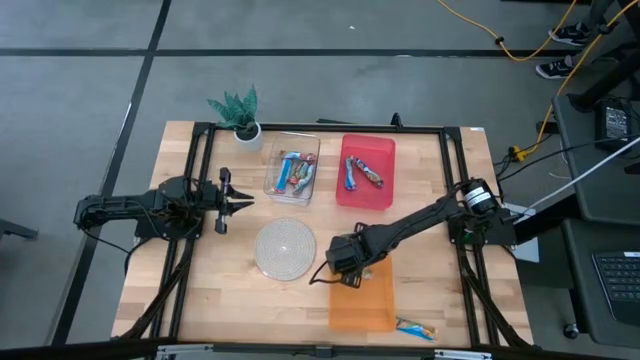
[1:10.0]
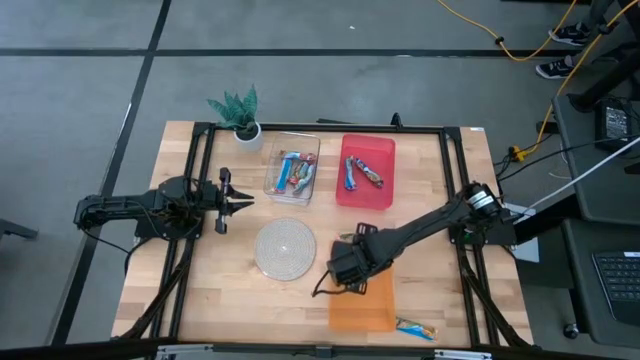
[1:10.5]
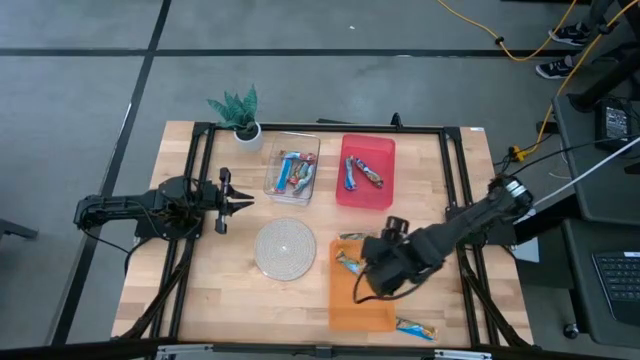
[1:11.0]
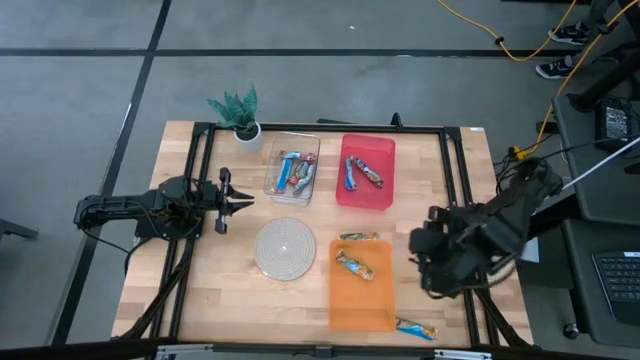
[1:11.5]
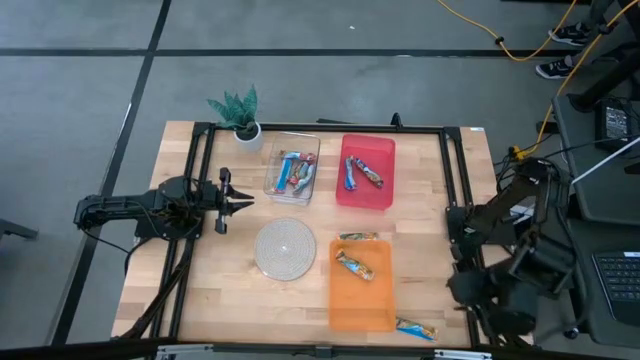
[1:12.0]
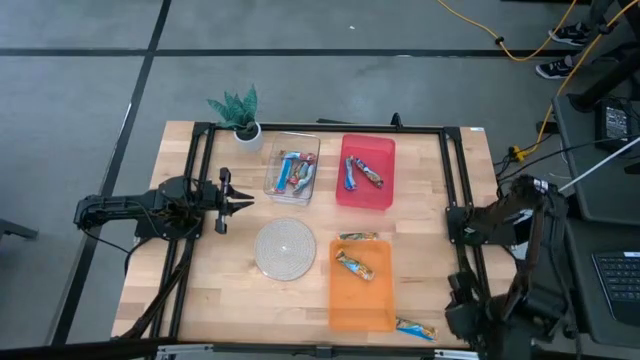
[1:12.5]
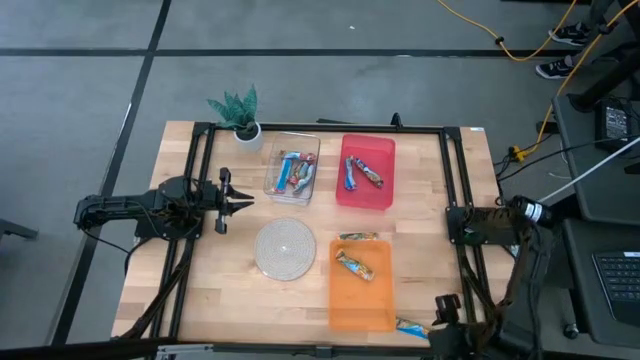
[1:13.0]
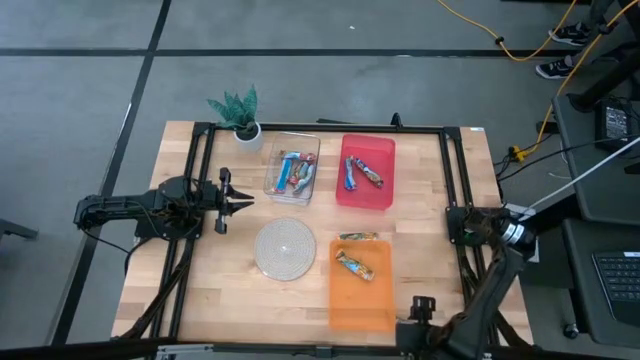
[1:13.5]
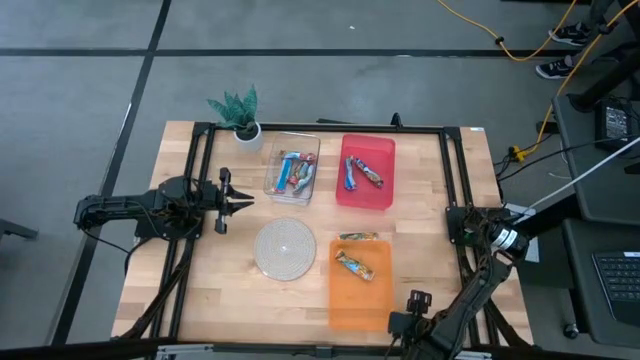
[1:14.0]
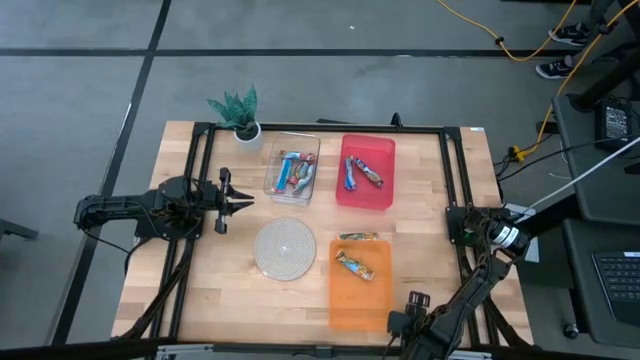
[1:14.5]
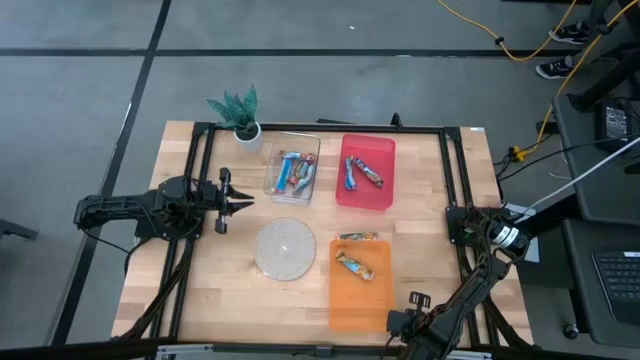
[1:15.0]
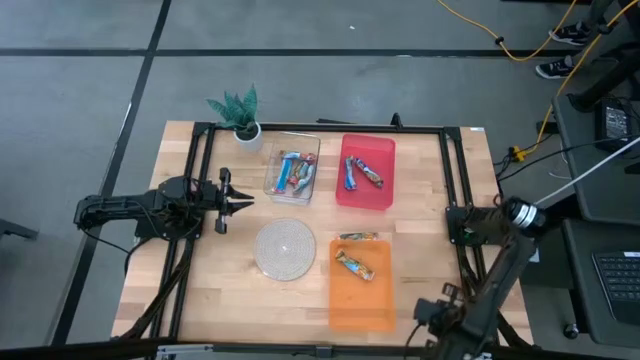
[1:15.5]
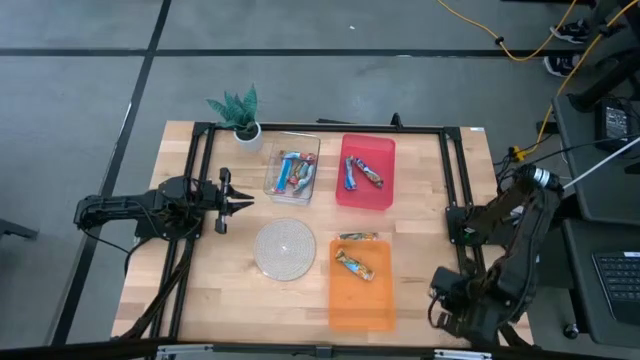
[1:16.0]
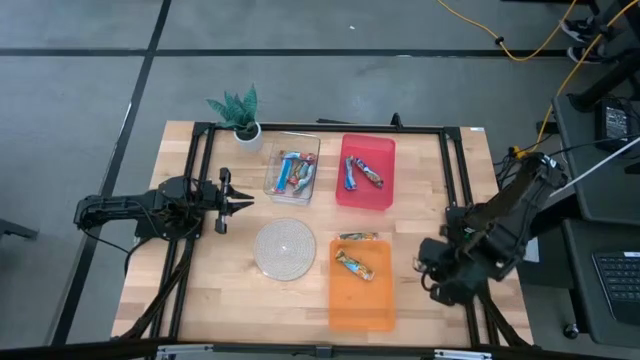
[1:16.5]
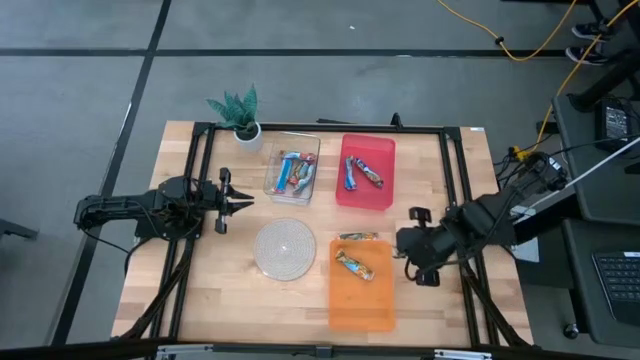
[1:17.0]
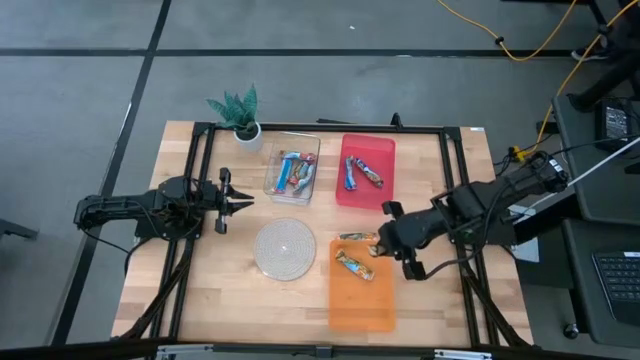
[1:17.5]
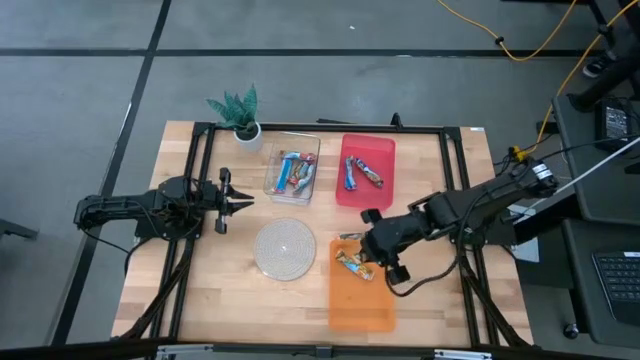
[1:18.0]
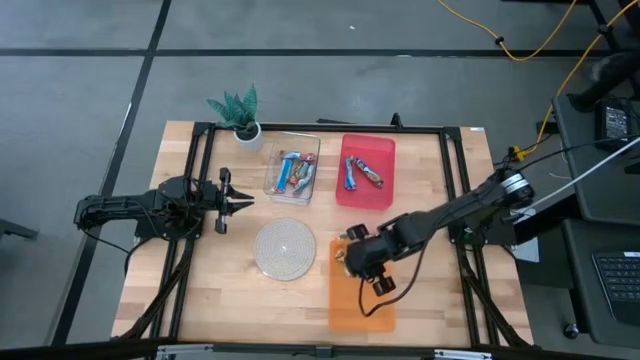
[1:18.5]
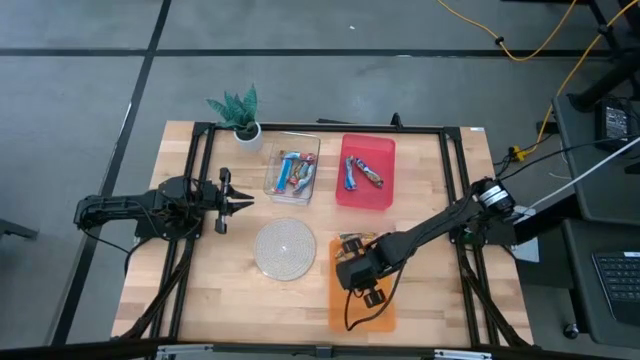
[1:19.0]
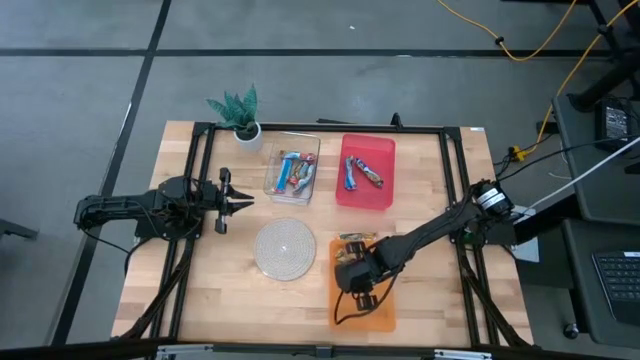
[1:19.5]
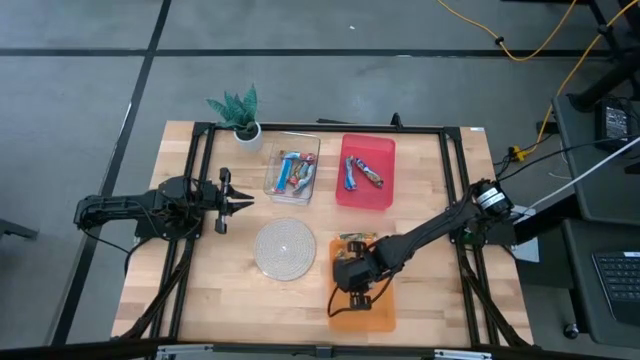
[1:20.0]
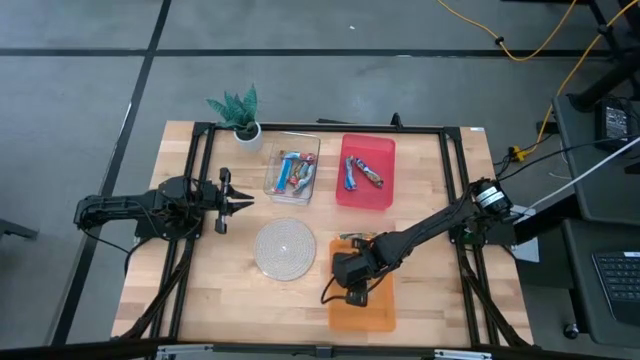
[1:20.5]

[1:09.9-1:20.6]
Task: Pick and place Granola Bars by type
Put the yellow granola bar into the orange bin

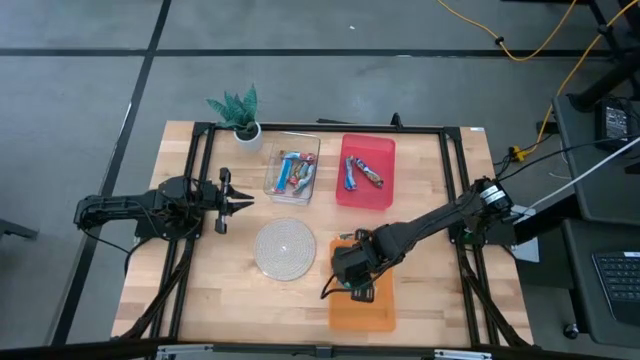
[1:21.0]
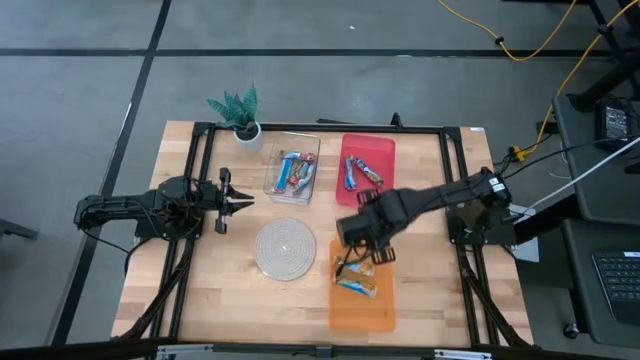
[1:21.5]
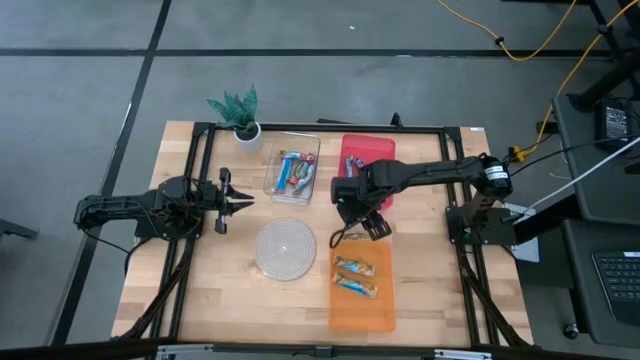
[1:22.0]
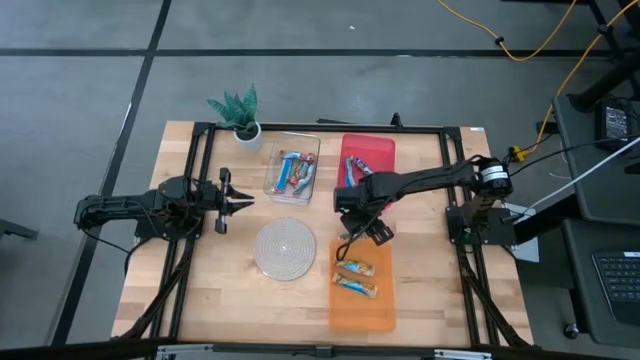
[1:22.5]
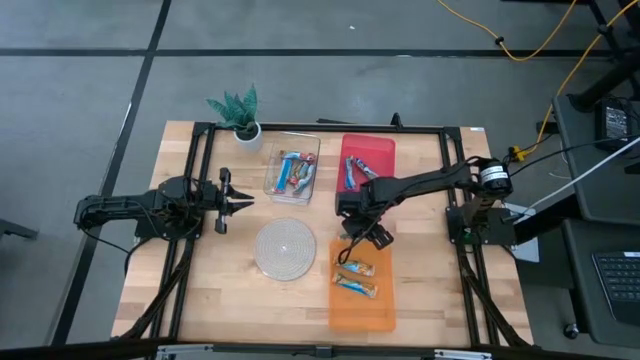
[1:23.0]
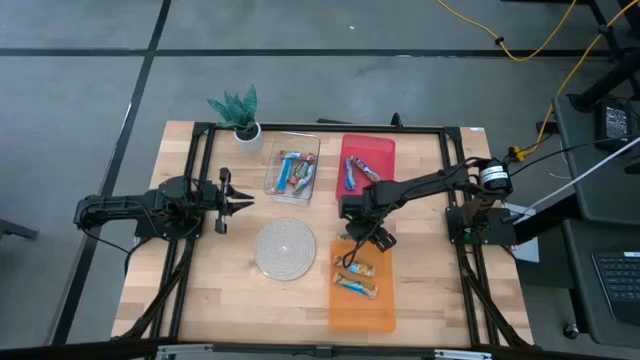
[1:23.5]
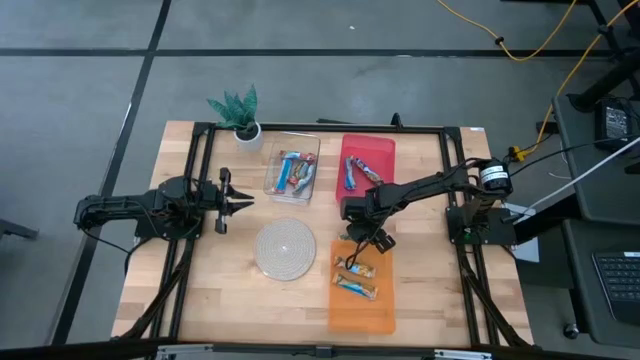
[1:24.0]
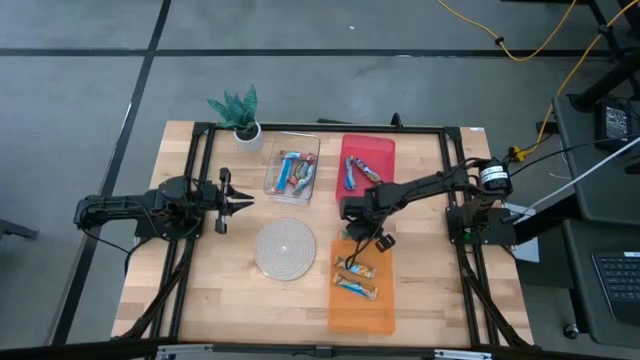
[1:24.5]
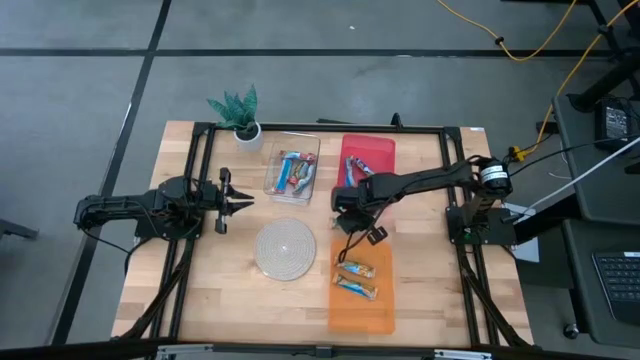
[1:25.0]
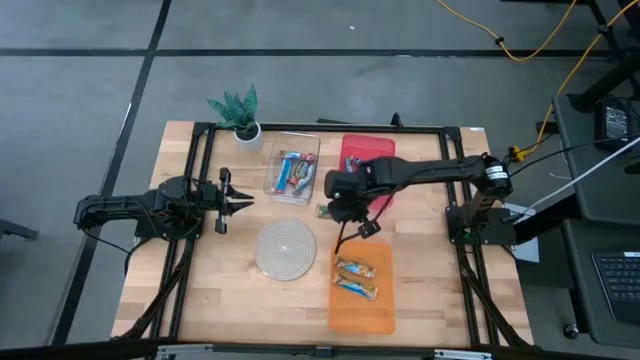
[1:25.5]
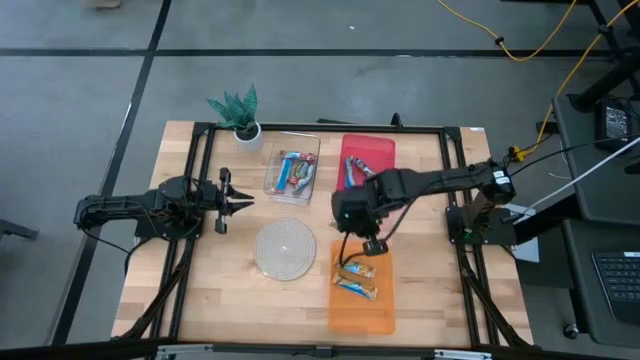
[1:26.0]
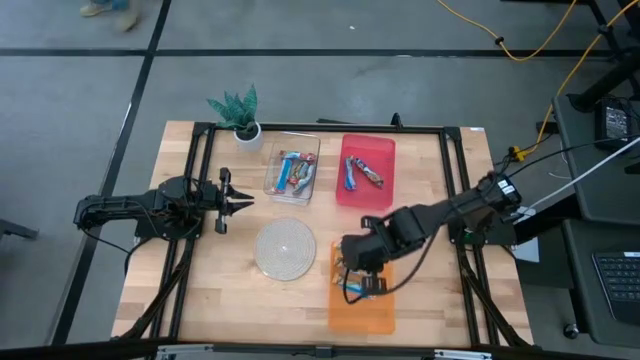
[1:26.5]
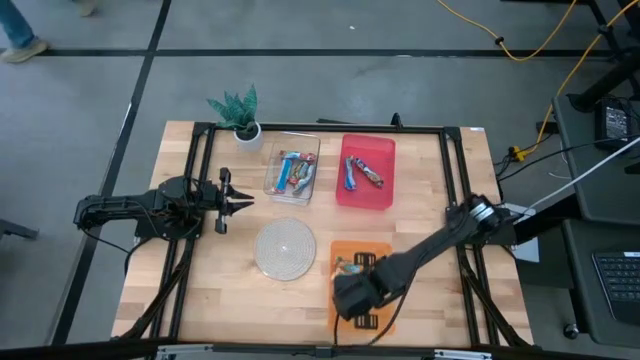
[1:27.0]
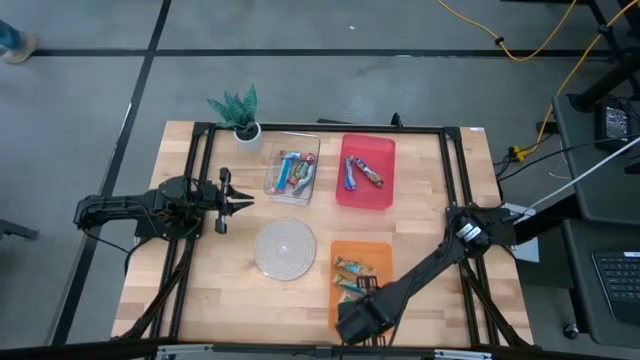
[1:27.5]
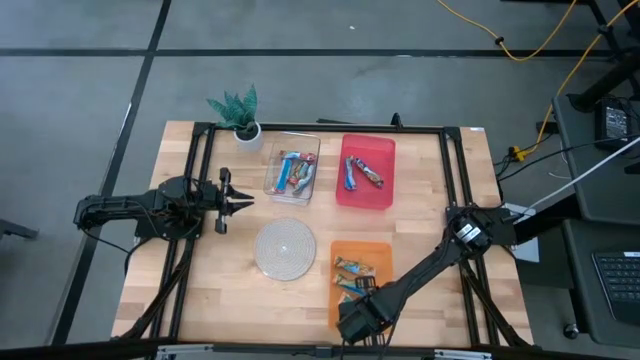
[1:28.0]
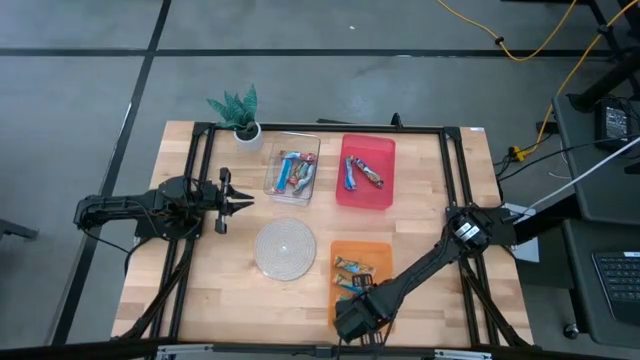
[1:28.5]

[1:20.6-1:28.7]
Put the yellow granola bar into the orange bin

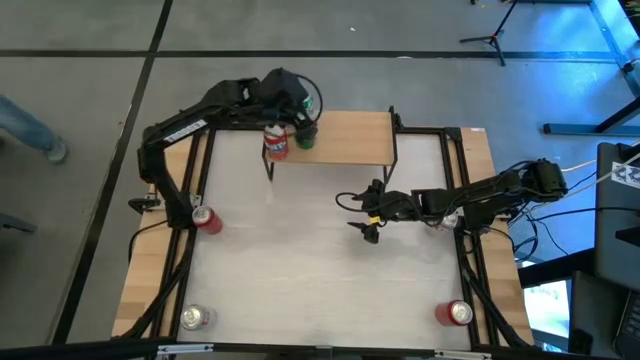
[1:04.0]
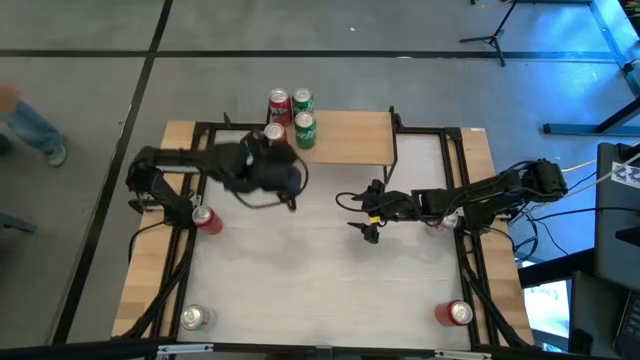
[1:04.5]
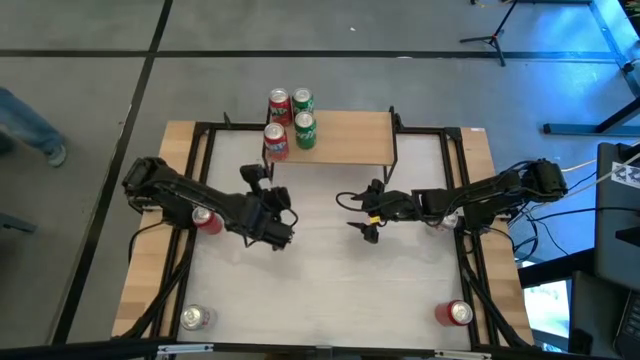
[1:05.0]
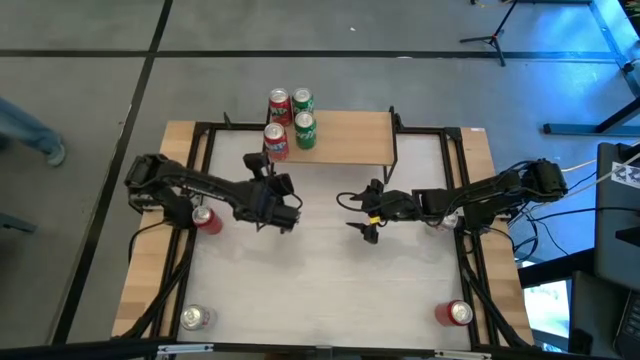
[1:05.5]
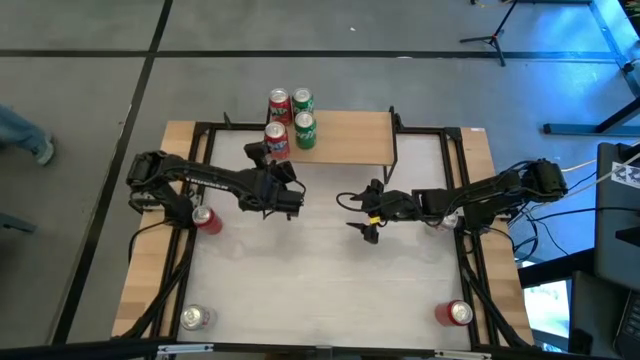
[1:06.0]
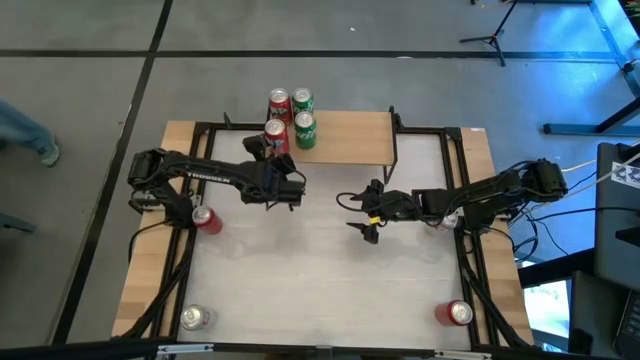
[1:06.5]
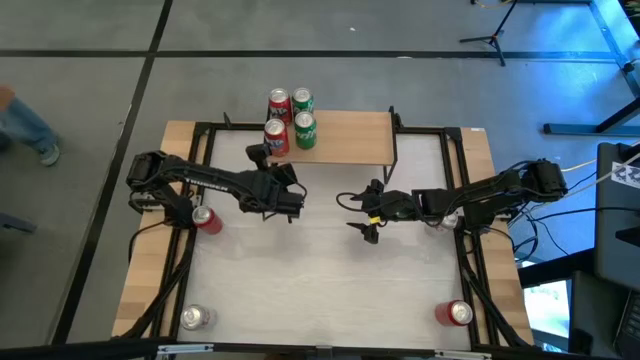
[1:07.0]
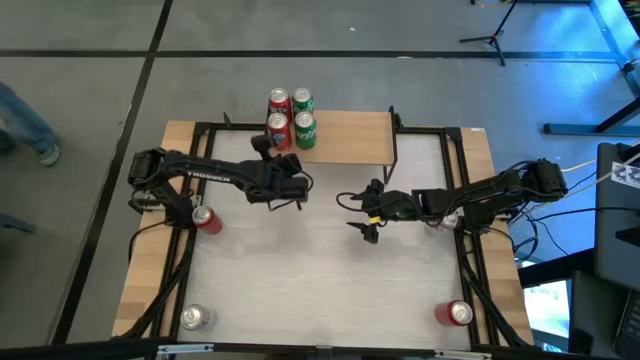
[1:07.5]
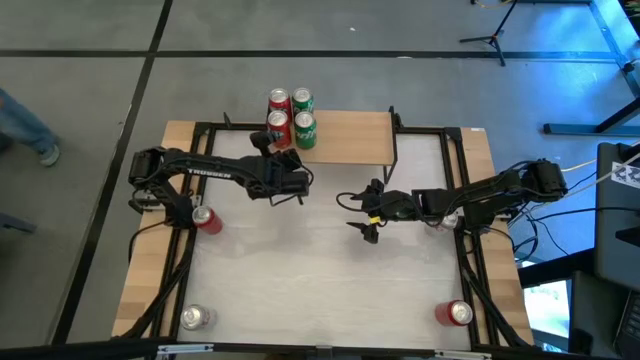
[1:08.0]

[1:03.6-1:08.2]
Task: Place canned beverage on shelf
Adjust the red soda can on the shelf
